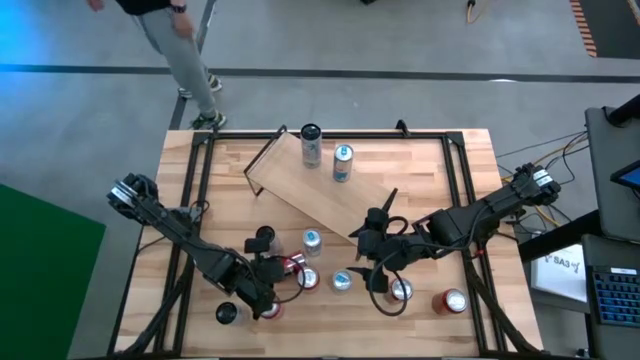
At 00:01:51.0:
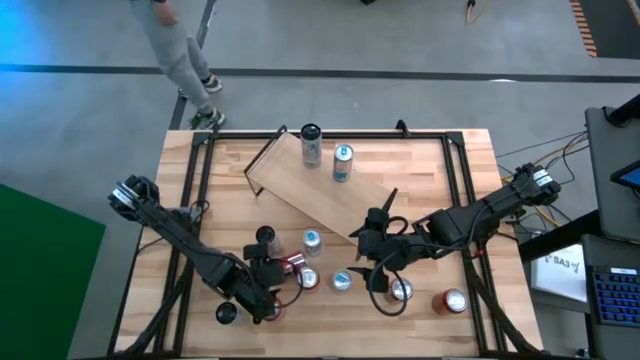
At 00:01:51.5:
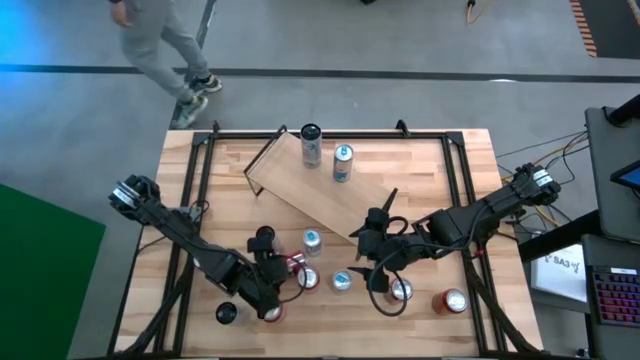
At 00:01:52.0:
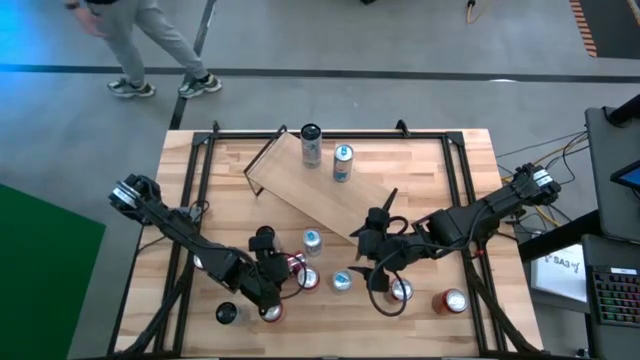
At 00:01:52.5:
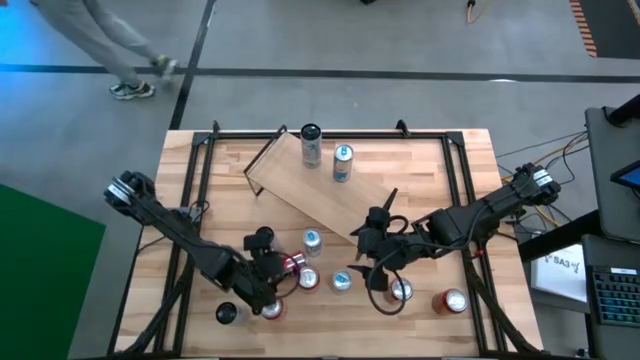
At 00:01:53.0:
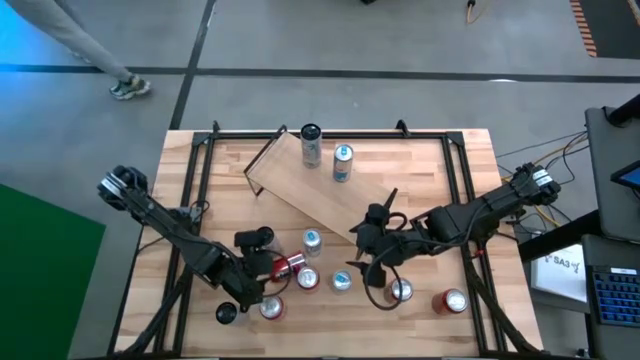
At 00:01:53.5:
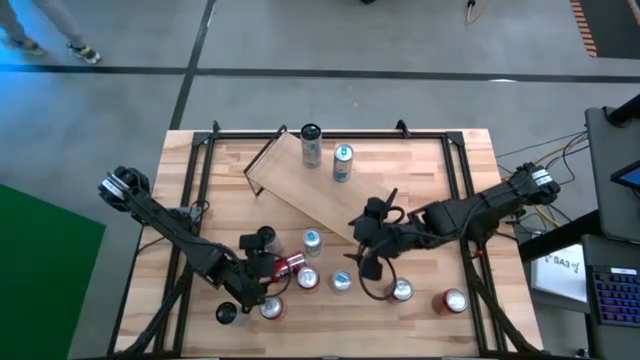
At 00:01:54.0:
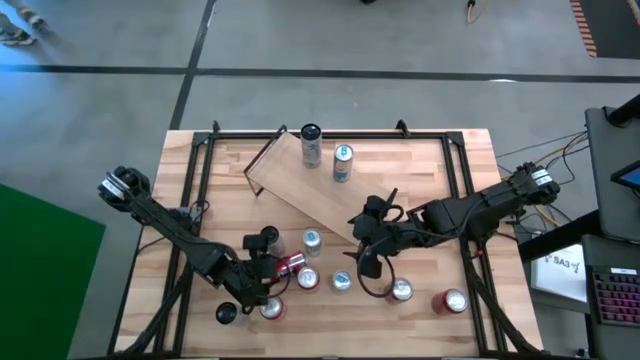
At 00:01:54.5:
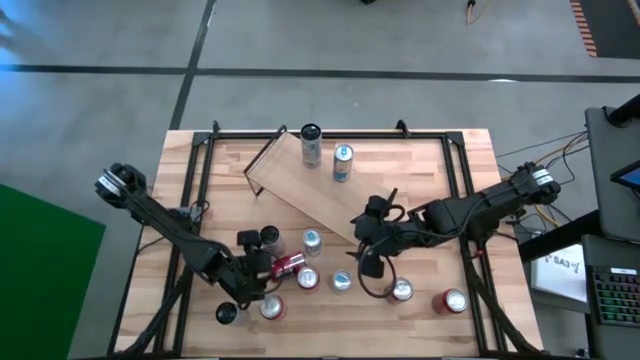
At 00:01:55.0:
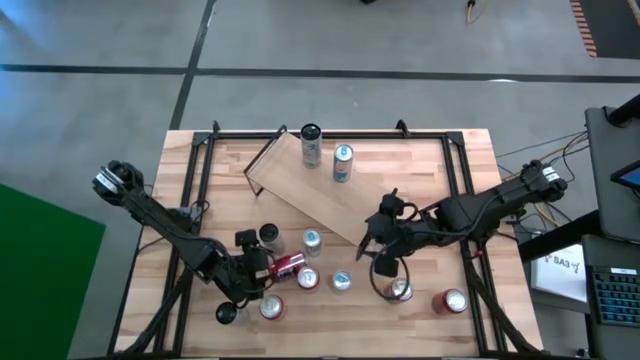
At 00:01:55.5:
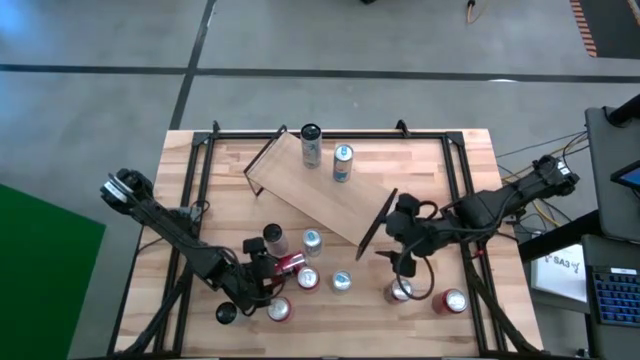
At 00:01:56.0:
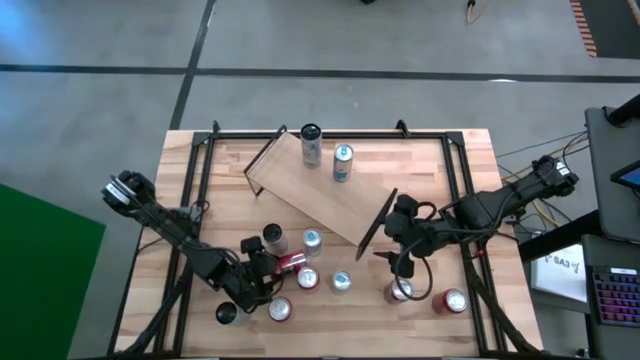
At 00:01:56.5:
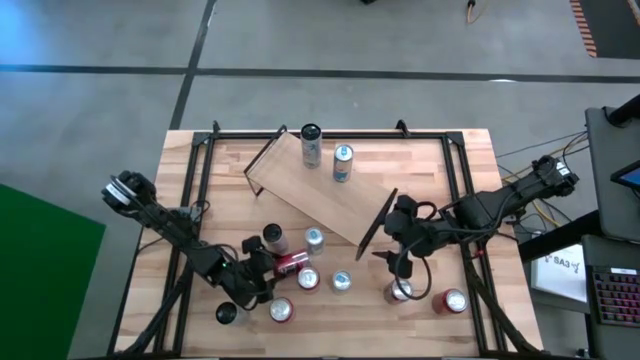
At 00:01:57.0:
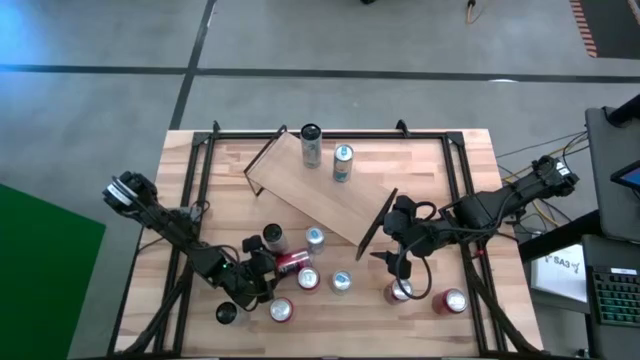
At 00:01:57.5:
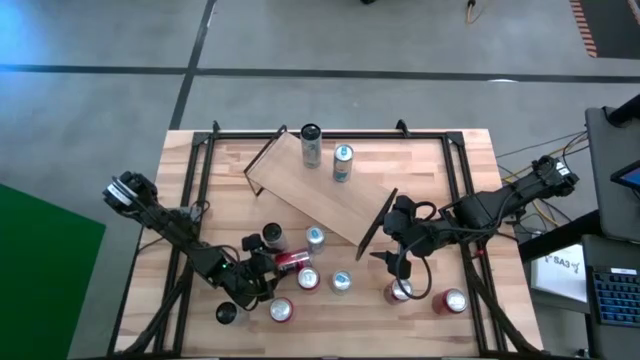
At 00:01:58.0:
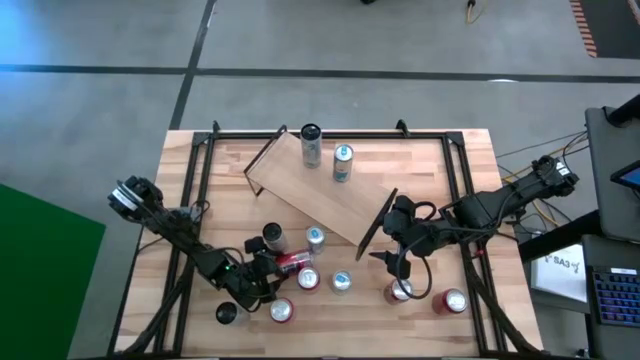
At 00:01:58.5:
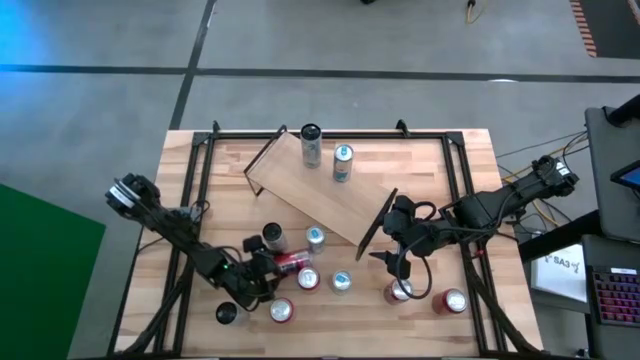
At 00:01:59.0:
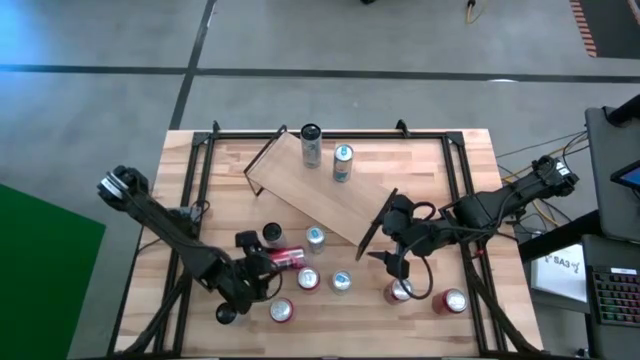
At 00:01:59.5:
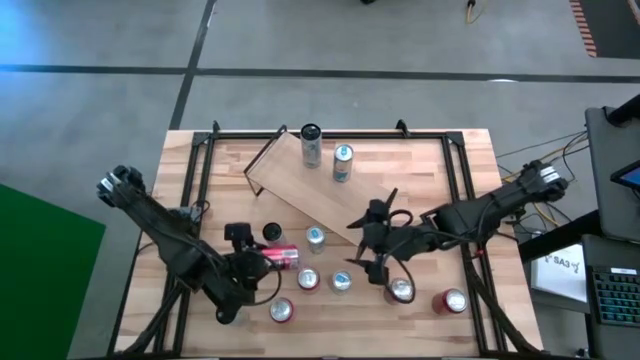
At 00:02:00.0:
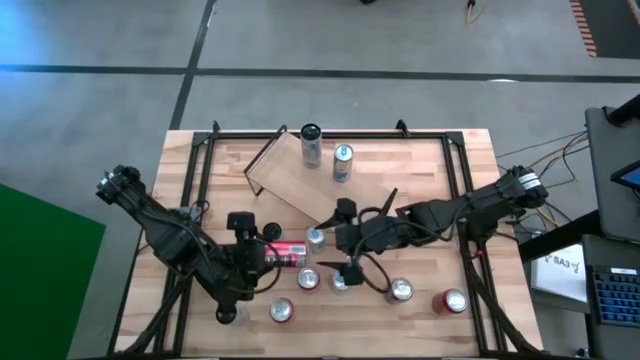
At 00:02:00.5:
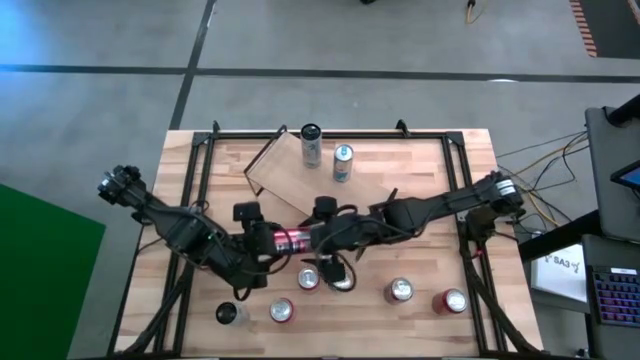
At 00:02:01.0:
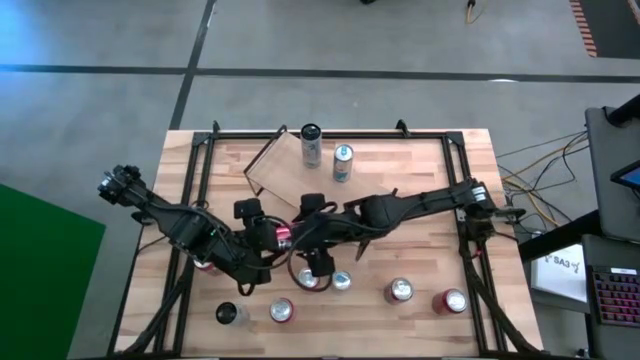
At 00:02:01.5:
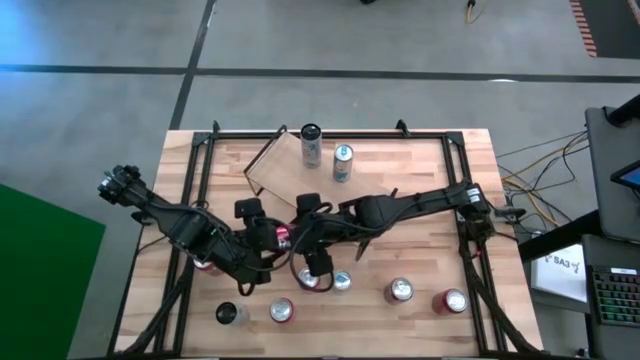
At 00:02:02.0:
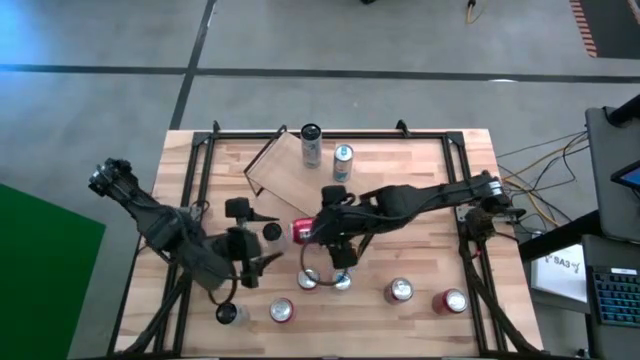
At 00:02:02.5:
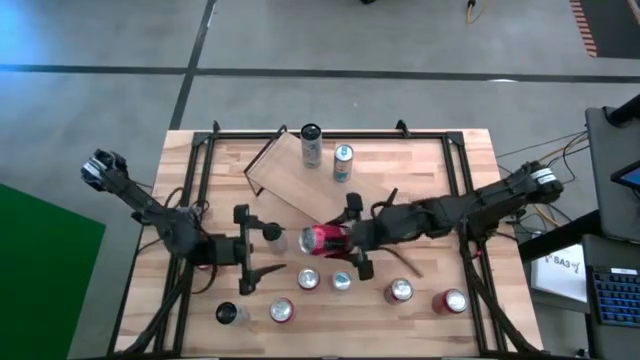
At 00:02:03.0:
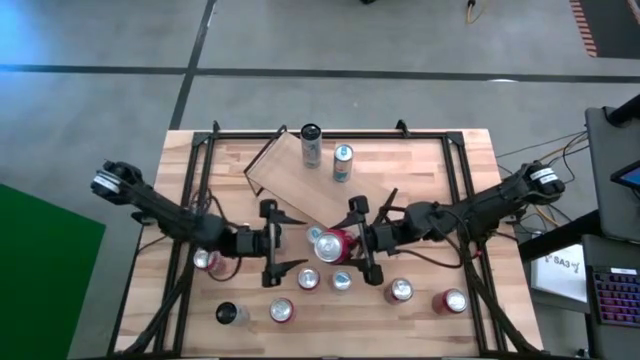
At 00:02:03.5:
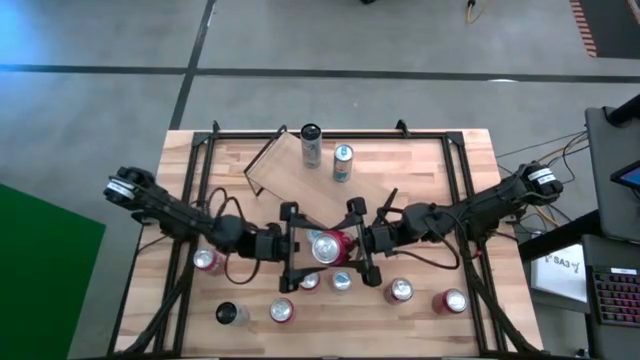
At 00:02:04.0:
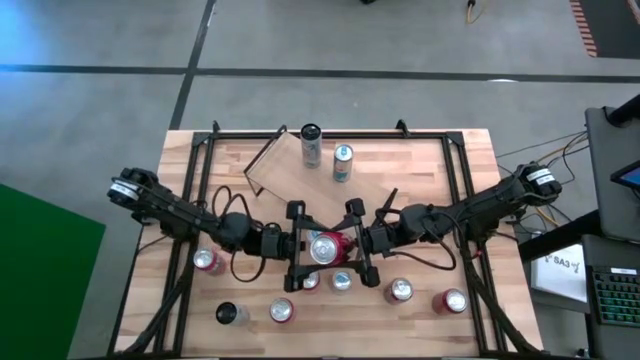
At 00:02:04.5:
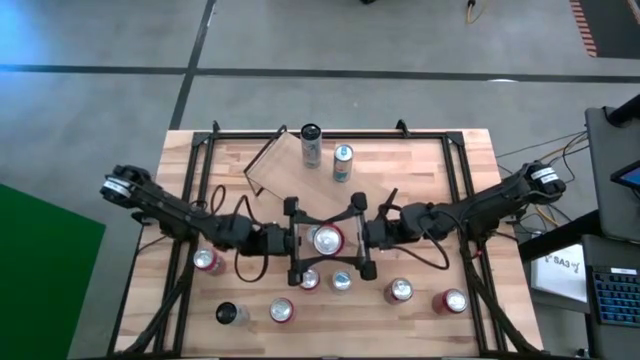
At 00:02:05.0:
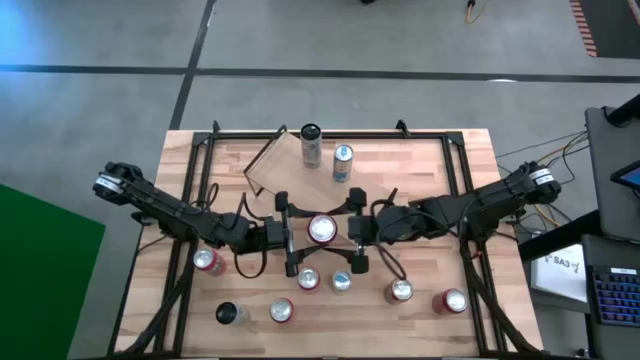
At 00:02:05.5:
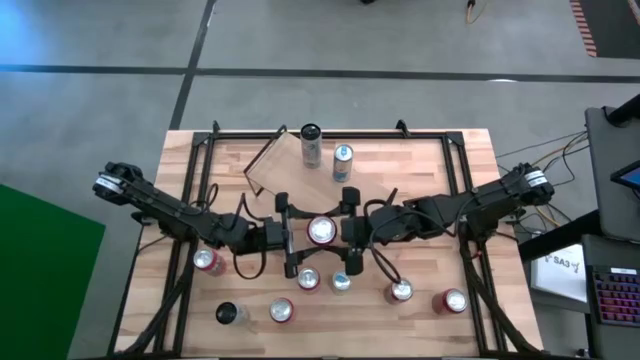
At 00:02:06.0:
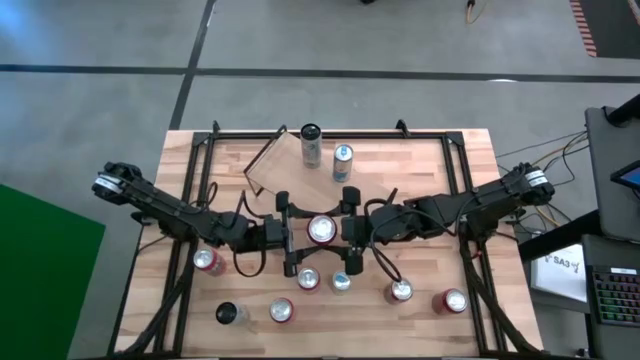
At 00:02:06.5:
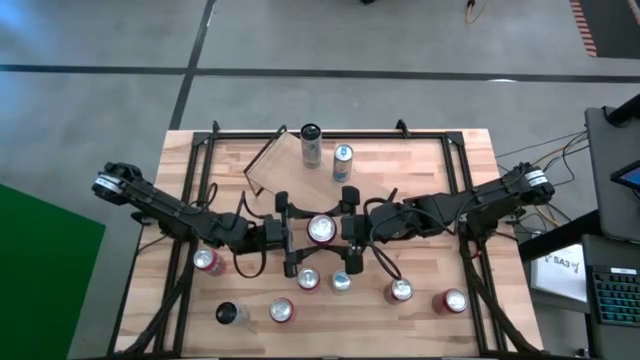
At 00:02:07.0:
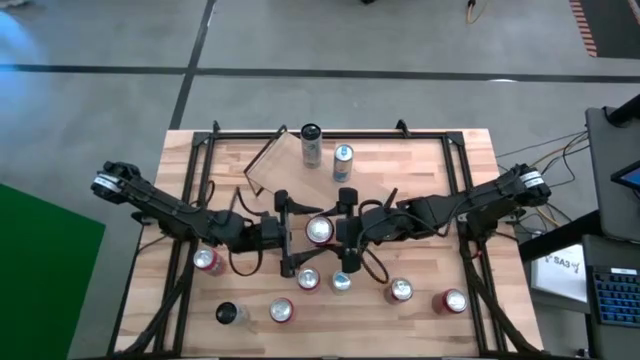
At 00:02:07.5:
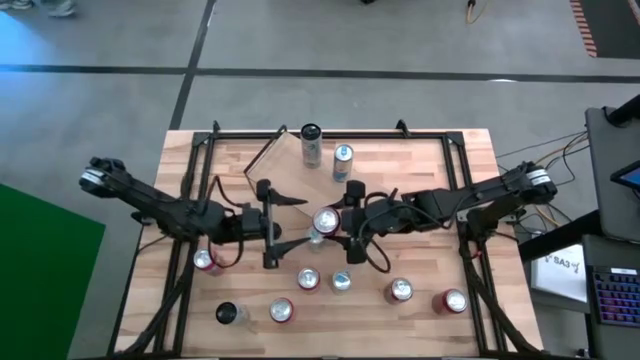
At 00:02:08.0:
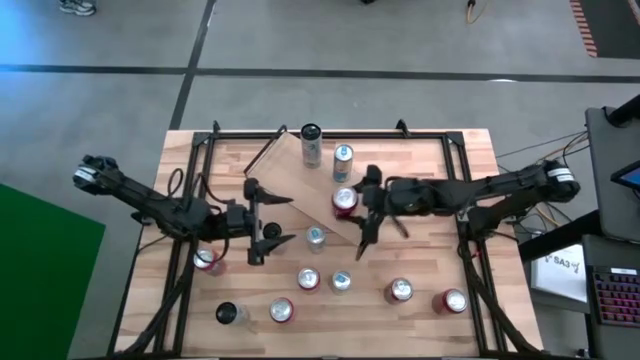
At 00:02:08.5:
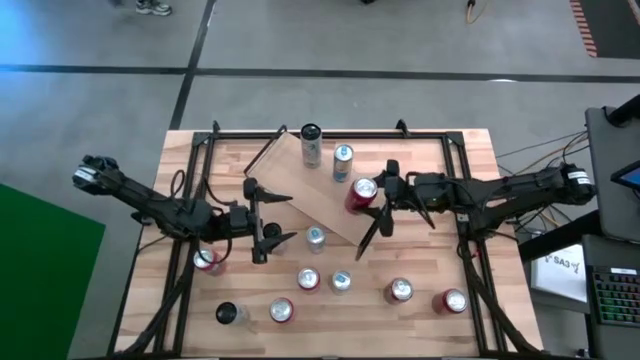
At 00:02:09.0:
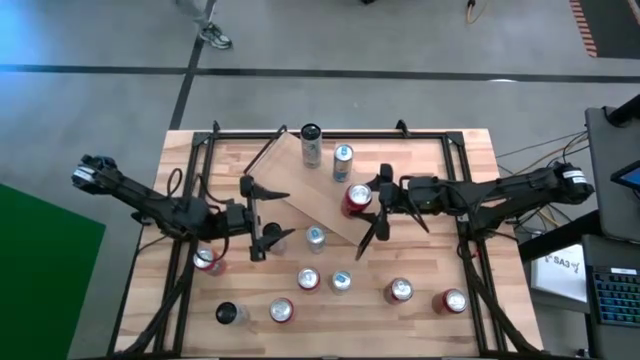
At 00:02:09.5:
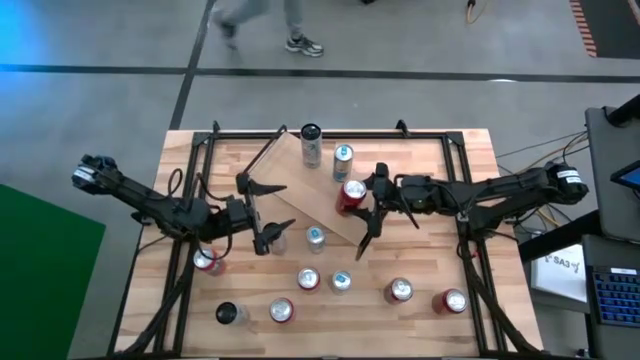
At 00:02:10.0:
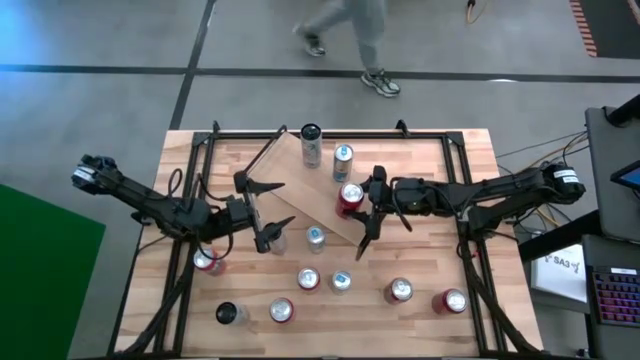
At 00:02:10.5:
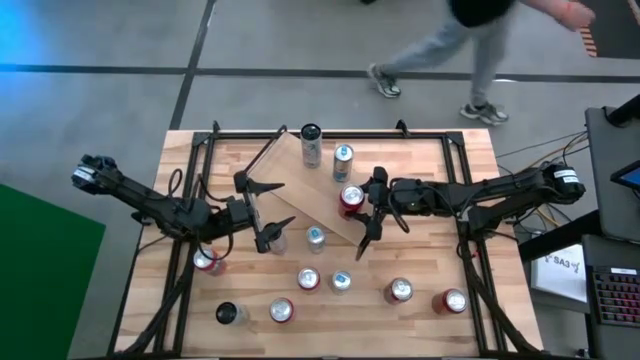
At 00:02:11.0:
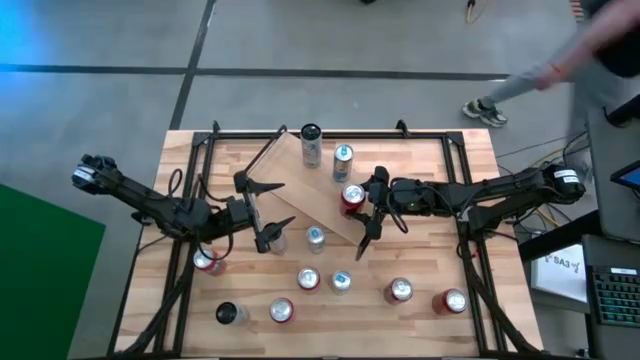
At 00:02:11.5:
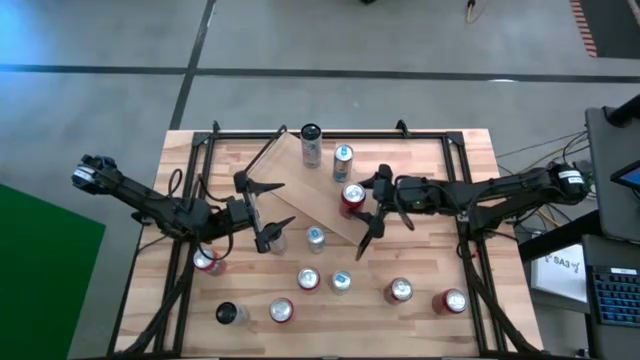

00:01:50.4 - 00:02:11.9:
Task: Place canned beverage on shelf
Put the red/black soda can on the shelf
